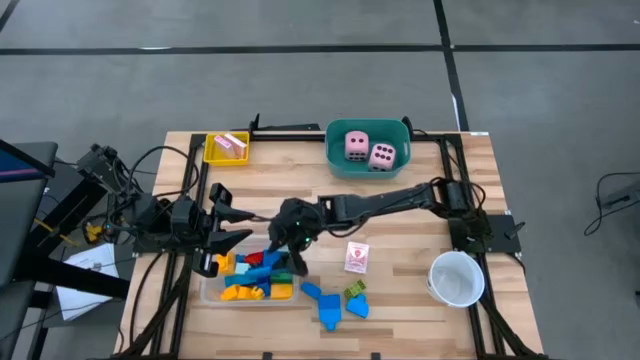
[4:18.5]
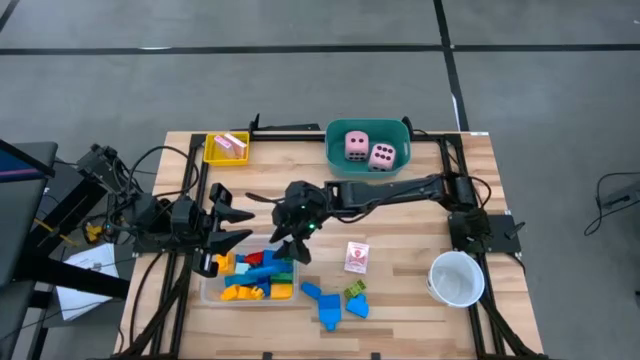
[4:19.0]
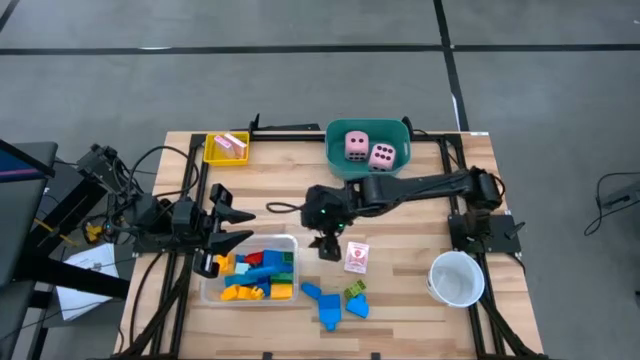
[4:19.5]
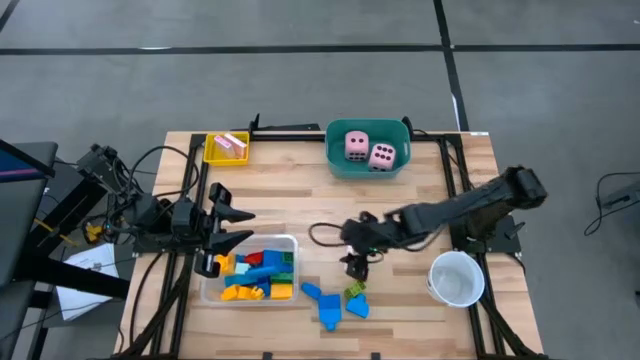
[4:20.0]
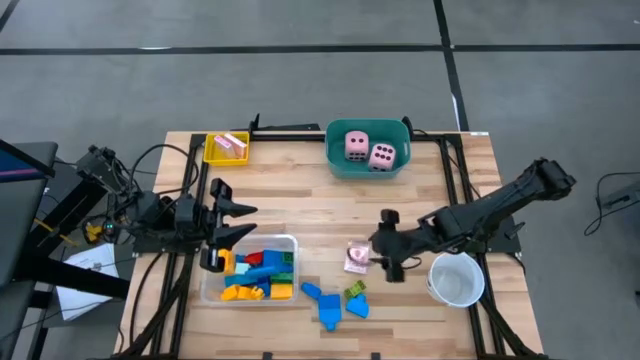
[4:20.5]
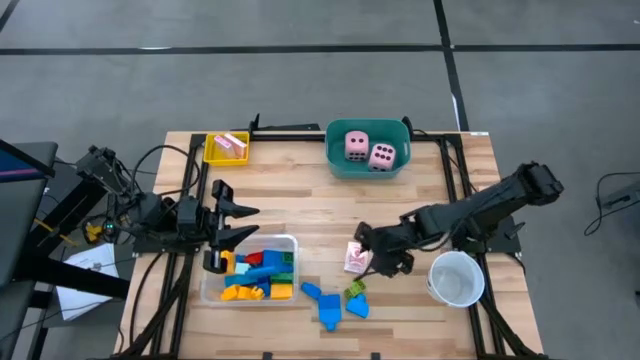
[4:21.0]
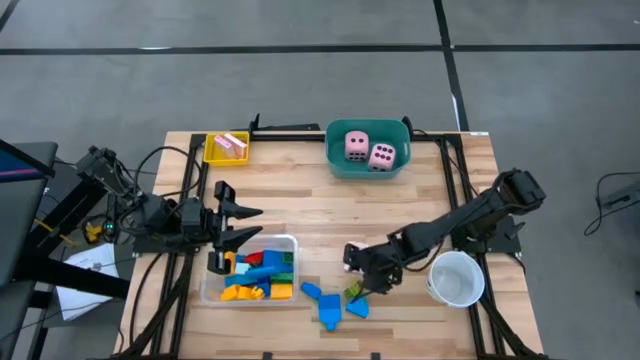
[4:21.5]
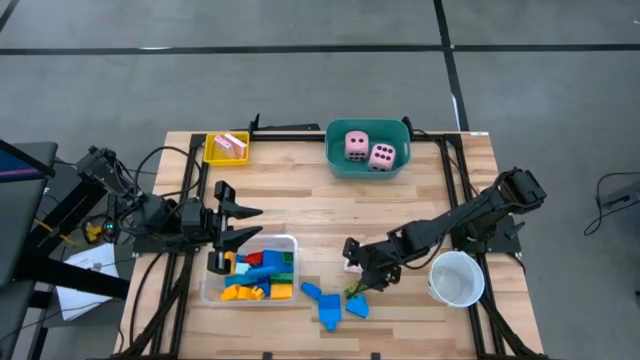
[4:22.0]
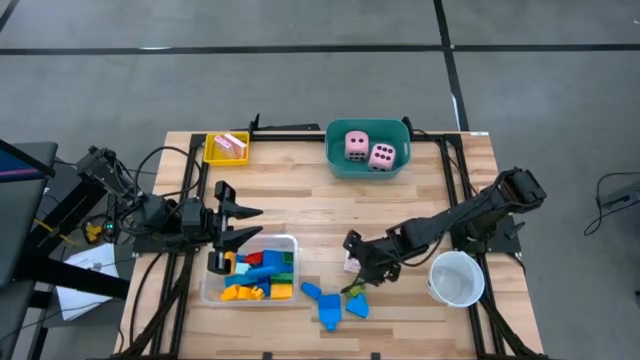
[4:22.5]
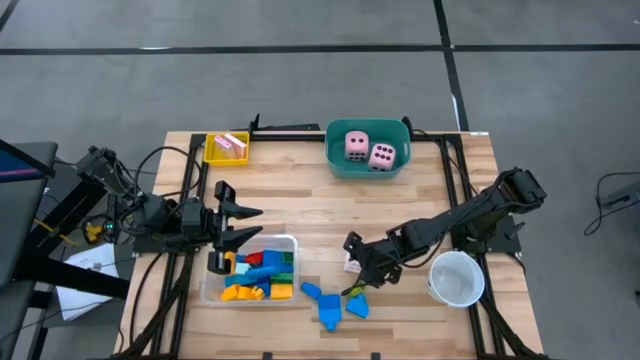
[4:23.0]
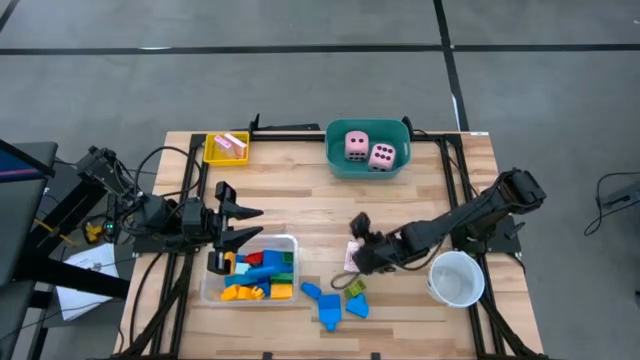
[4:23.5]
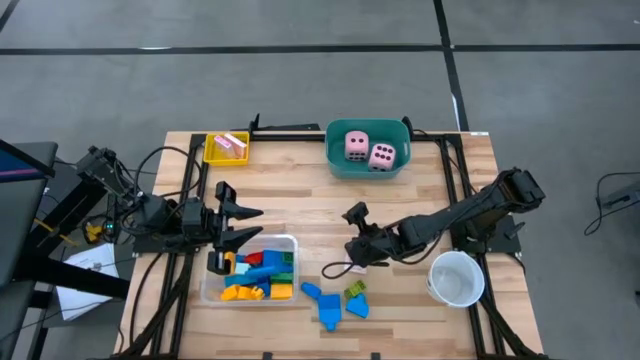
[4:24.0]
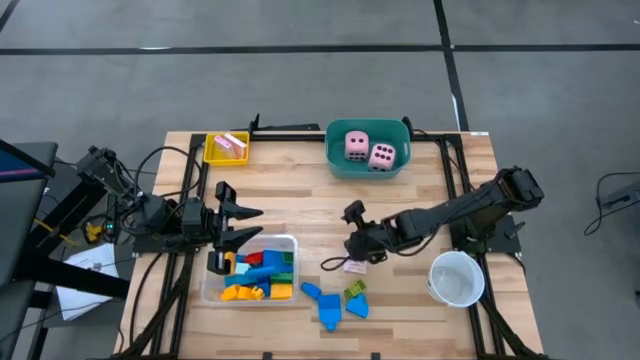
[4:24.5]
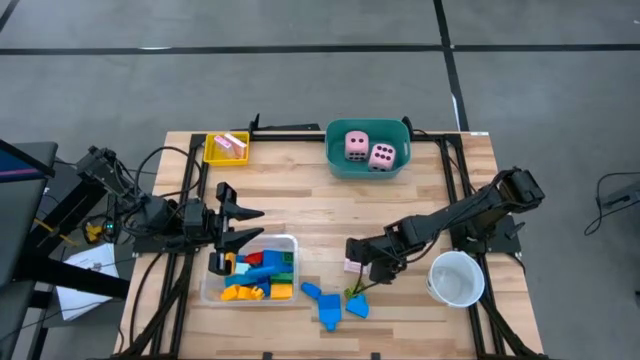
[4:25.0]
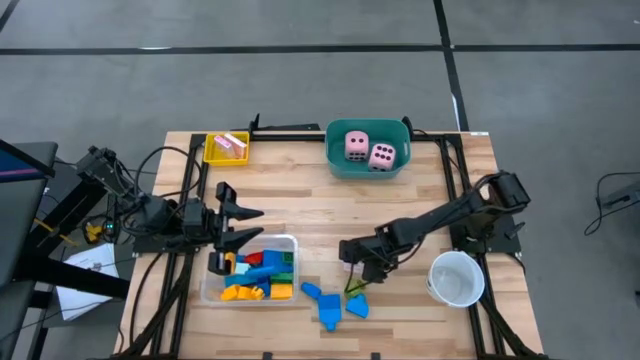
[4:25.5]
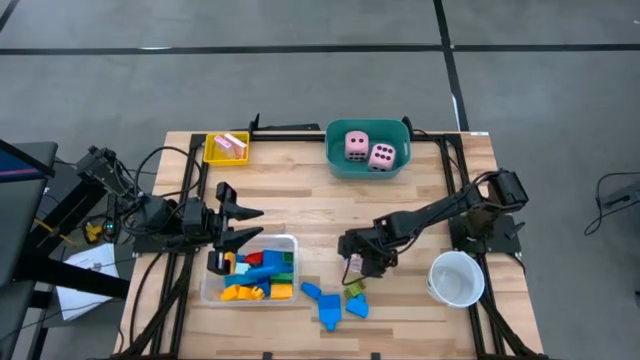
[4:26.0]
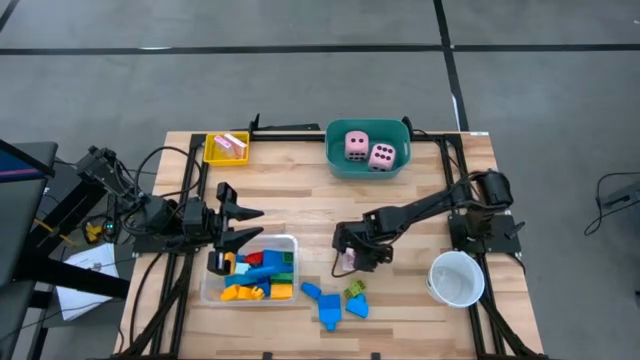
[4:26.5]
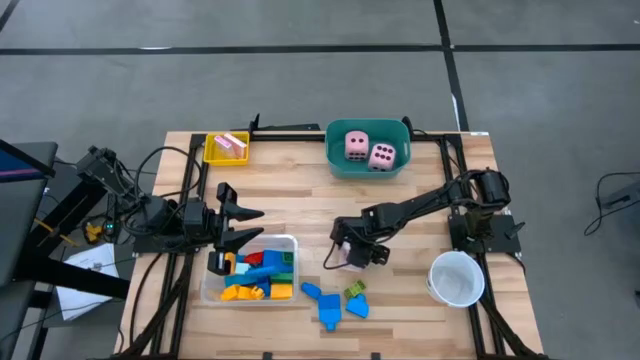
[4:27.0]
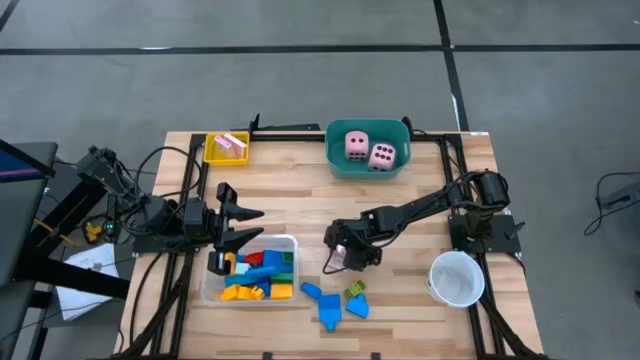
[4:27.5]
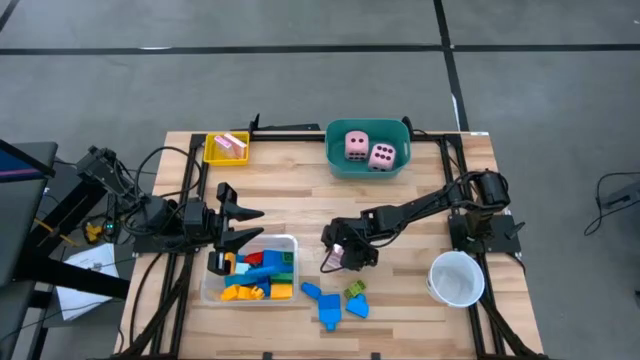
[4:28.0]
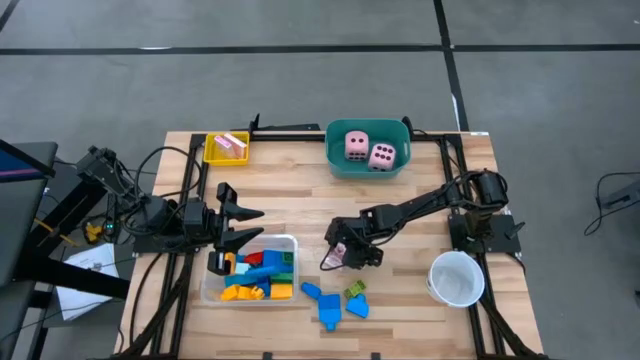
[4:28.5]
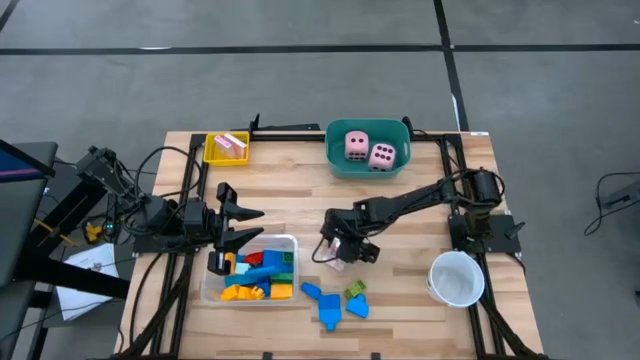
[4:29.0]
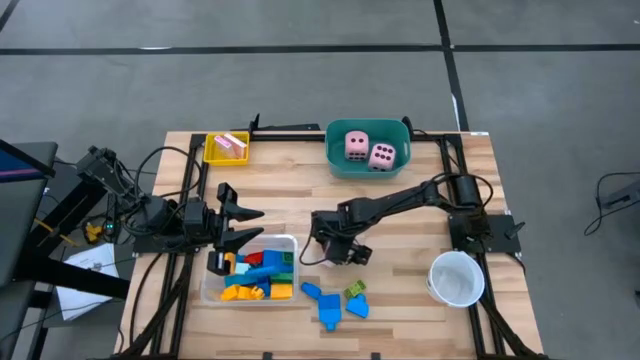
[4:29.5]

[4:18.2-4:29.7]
Task: Pick & Place Toys
Put the red playing card into the yellow bin

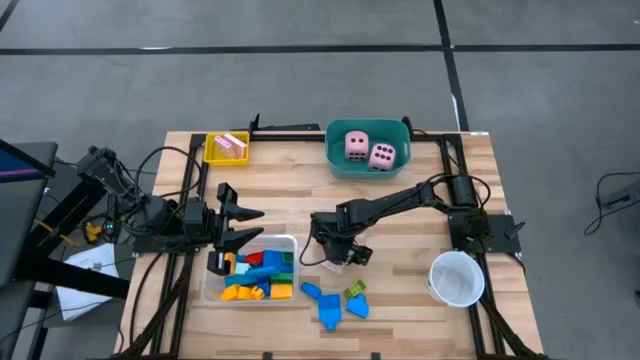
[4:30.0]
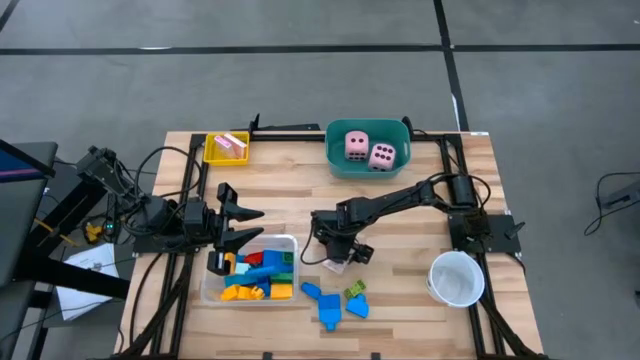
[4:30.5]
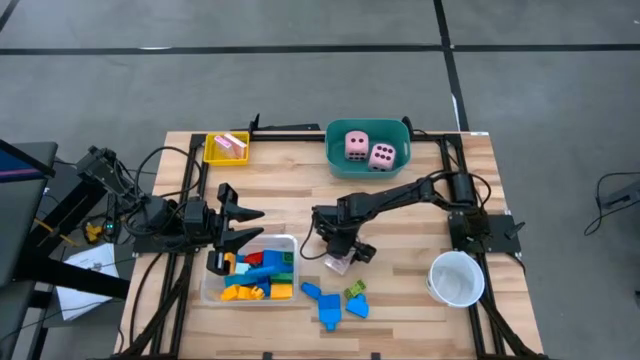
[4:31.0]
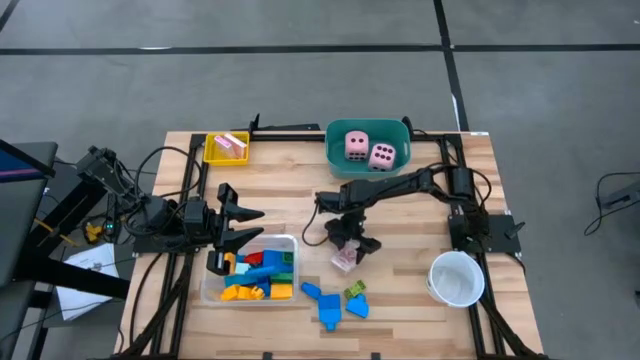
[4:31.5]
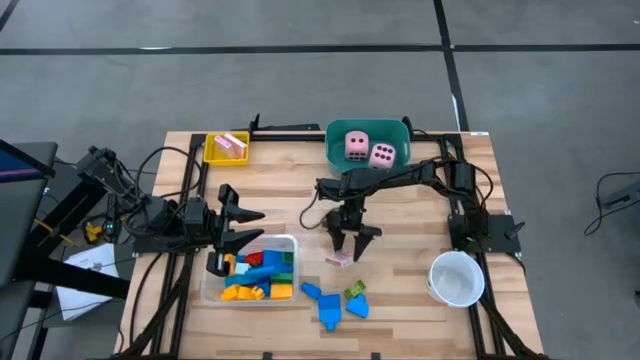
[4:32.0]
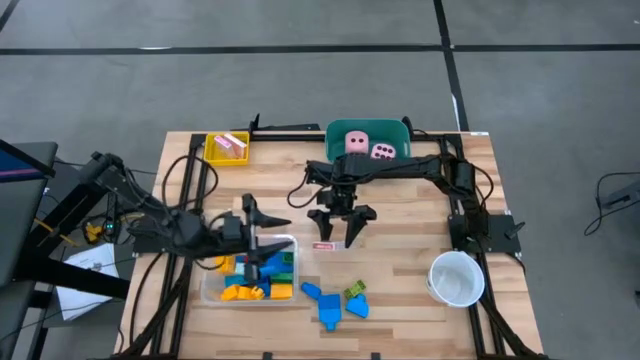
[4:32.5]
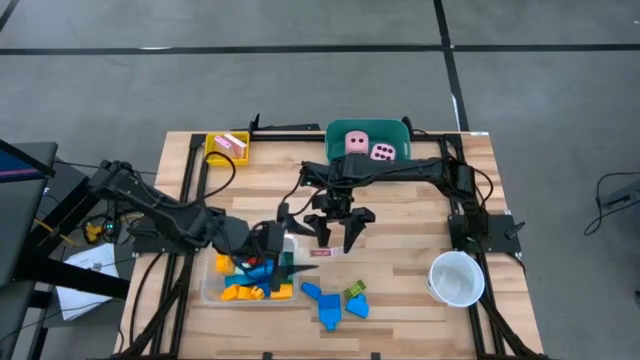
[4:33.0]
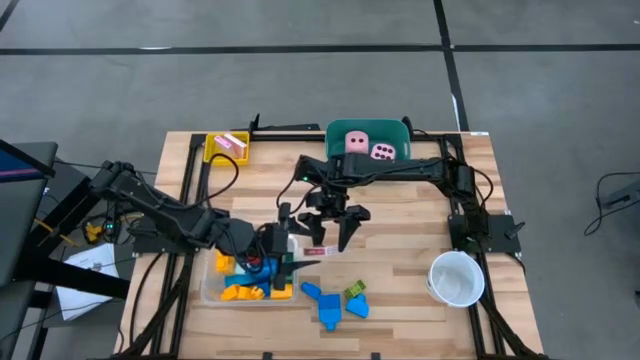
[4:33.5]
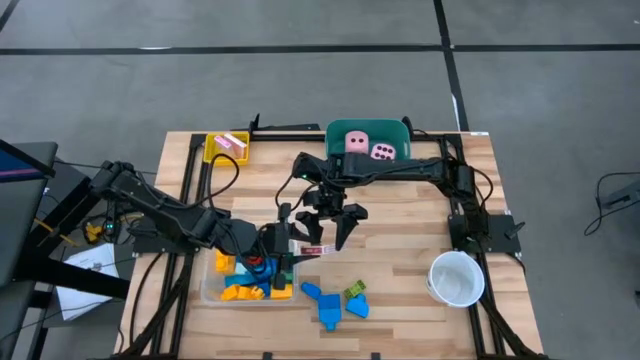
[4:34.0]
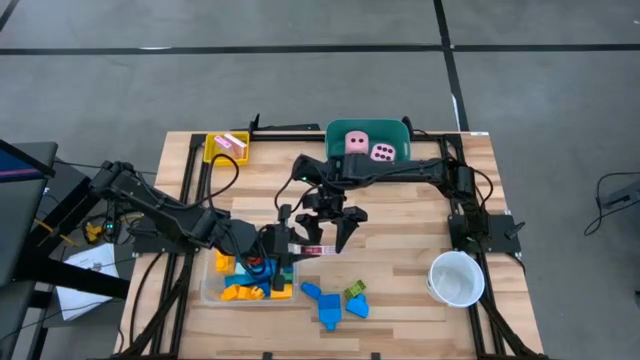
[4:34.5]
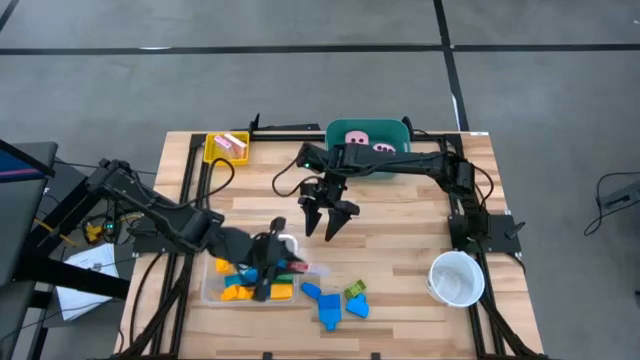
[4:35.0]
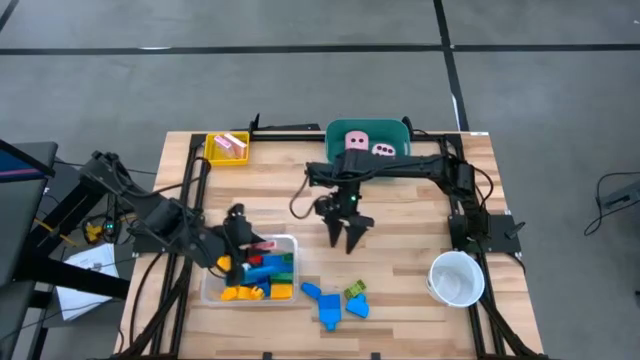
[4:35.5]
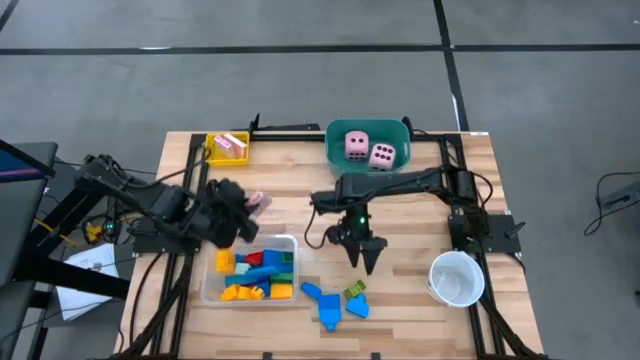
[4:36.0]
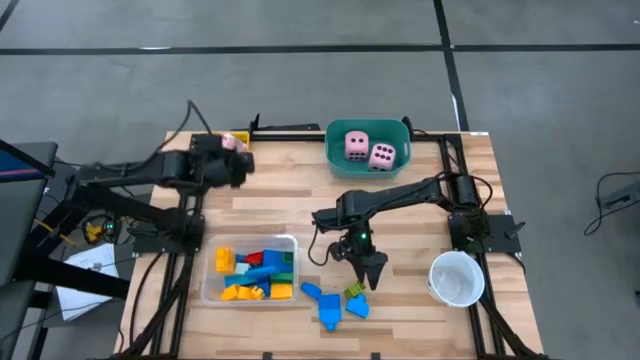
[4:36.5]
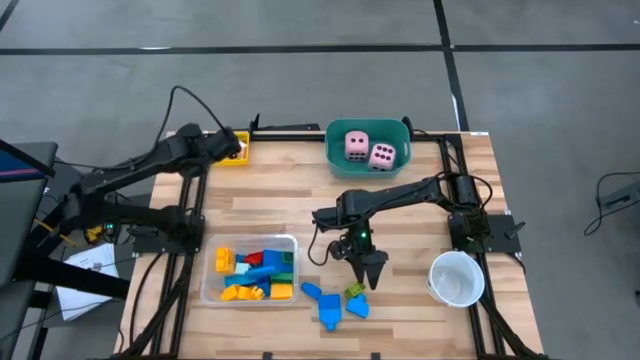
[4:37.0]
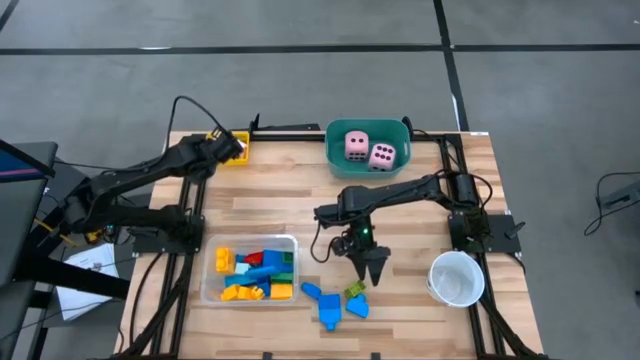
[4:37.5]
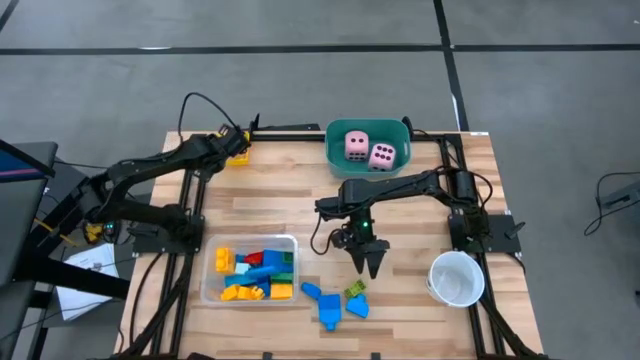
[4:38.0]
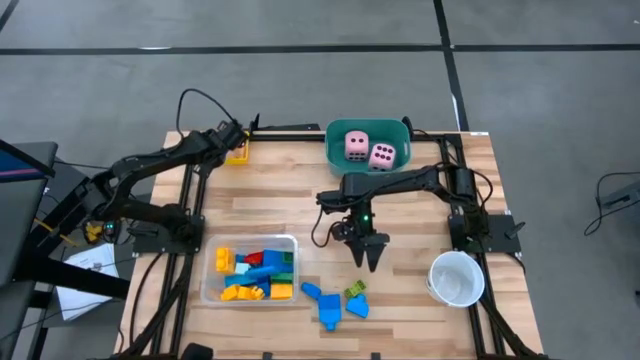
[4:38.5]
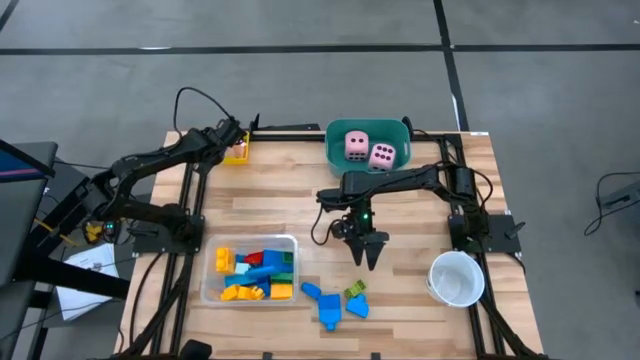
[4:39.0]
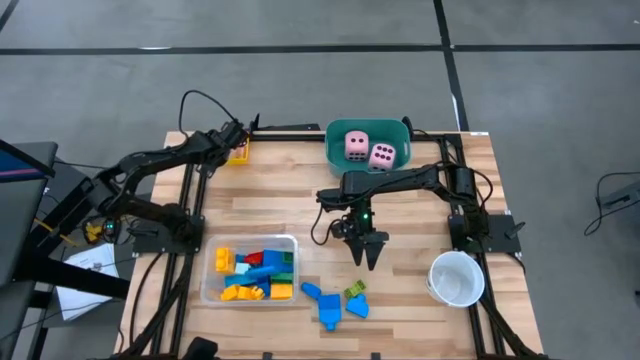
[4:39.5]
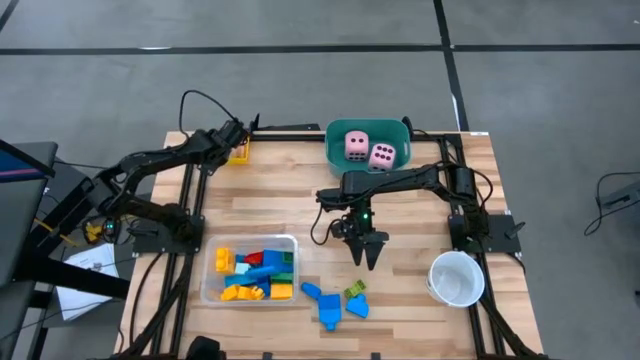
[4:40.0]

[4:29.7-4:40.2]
Put the red playing card into the yellow bin
